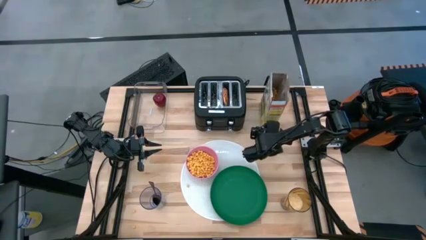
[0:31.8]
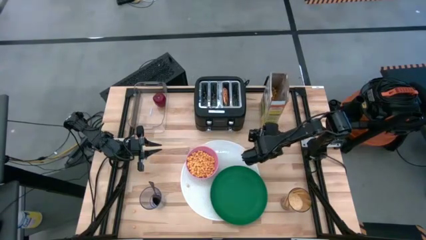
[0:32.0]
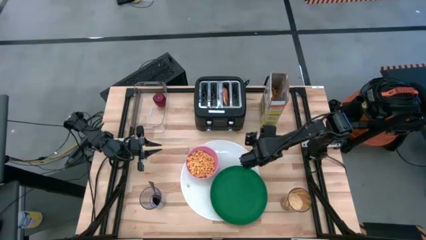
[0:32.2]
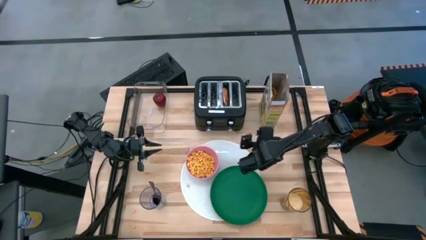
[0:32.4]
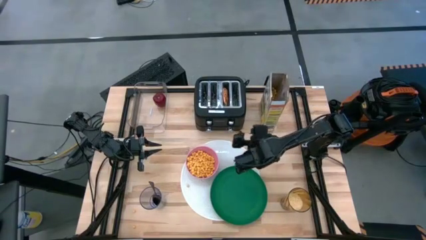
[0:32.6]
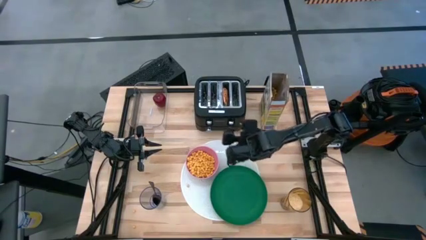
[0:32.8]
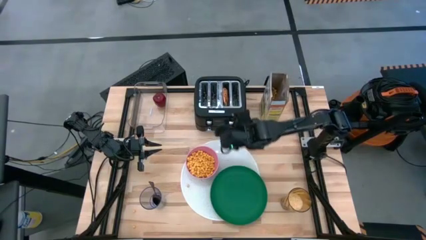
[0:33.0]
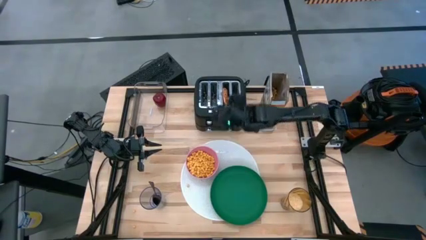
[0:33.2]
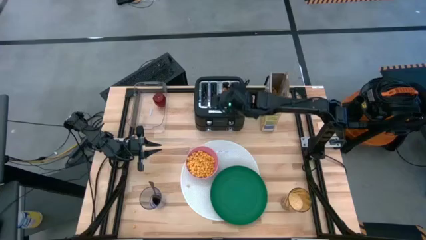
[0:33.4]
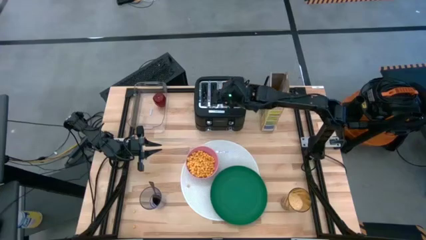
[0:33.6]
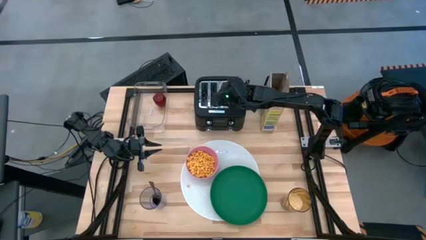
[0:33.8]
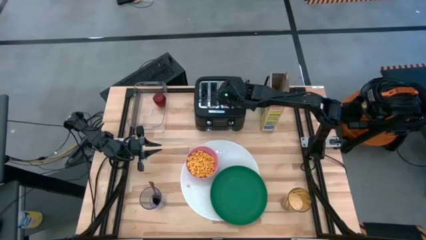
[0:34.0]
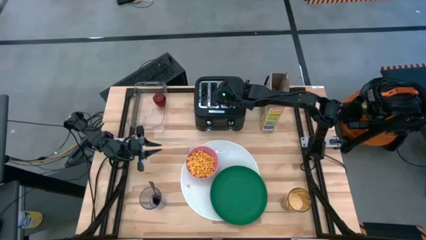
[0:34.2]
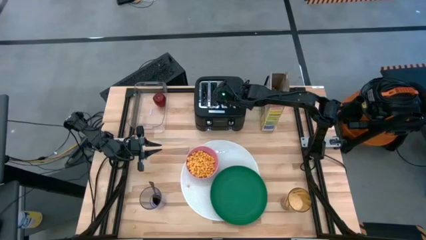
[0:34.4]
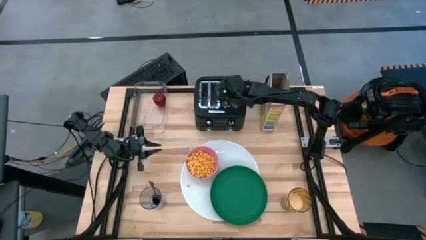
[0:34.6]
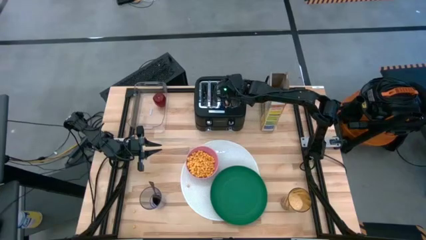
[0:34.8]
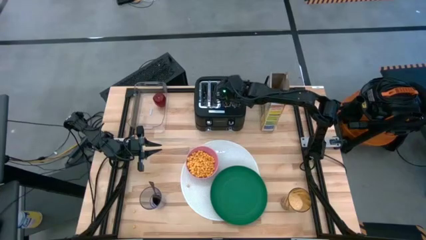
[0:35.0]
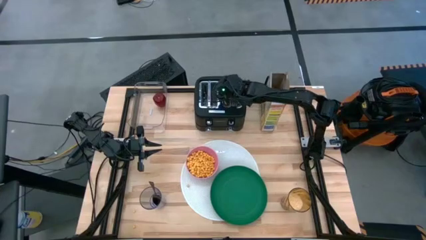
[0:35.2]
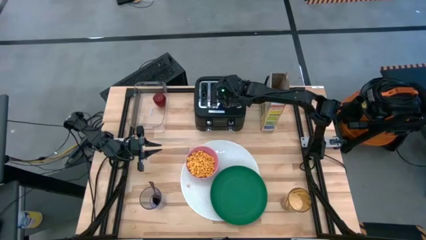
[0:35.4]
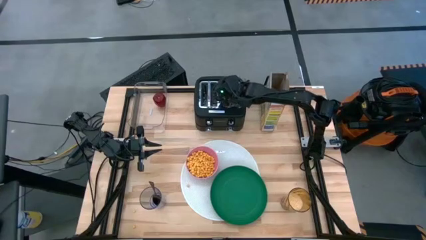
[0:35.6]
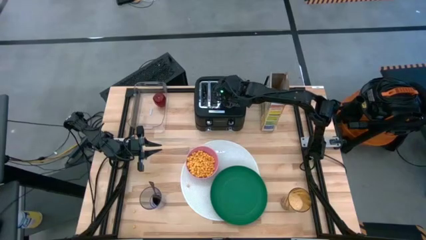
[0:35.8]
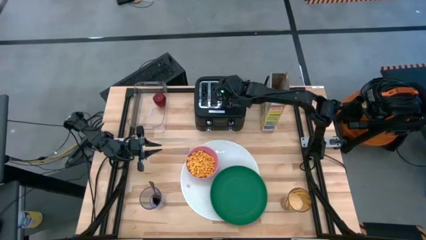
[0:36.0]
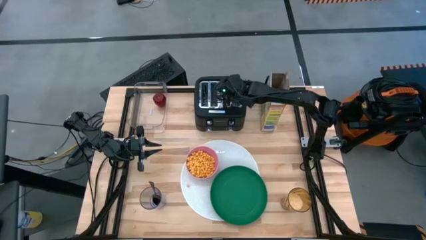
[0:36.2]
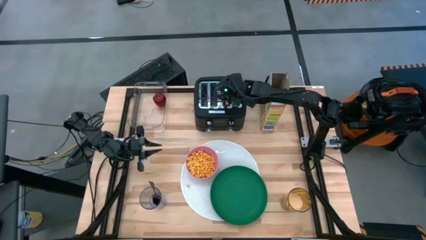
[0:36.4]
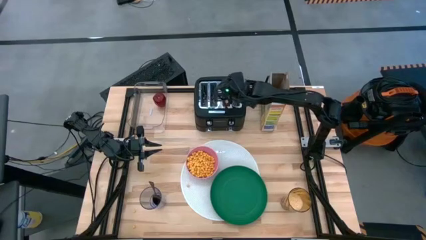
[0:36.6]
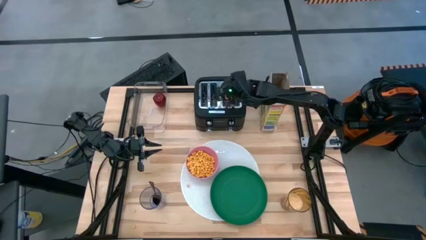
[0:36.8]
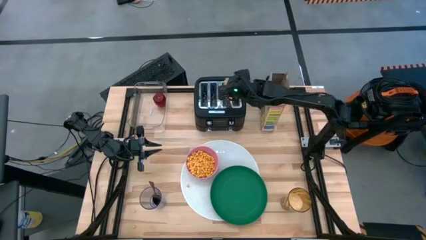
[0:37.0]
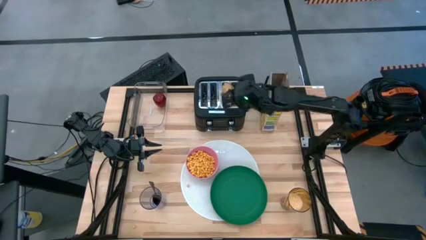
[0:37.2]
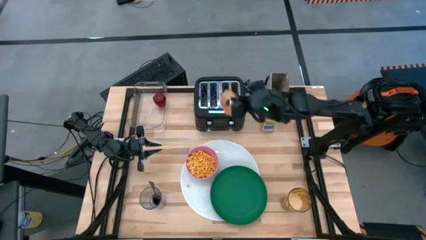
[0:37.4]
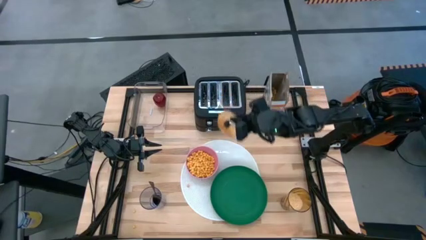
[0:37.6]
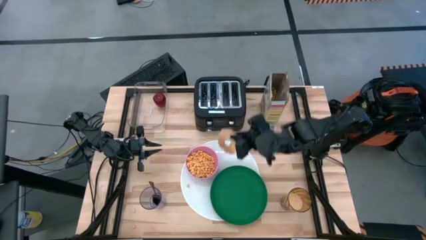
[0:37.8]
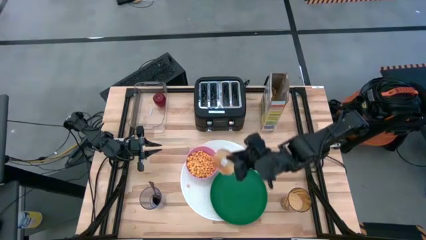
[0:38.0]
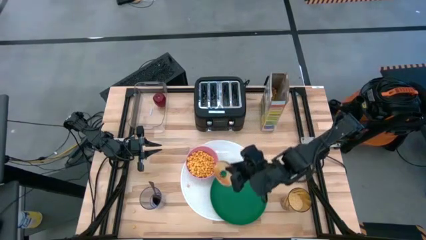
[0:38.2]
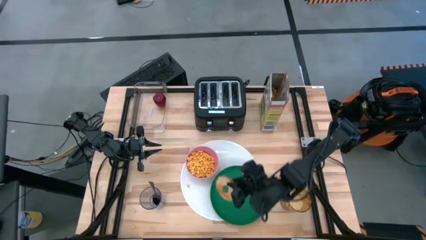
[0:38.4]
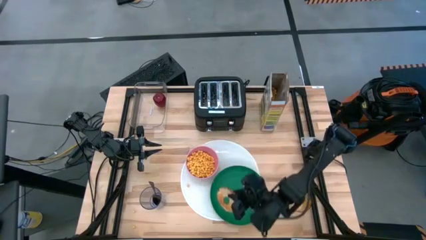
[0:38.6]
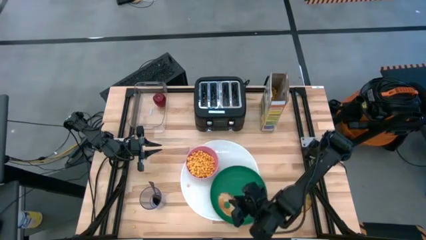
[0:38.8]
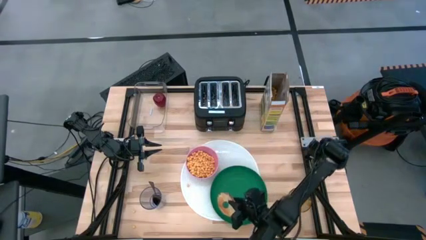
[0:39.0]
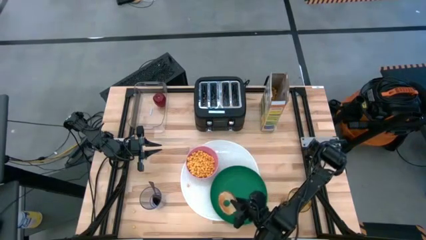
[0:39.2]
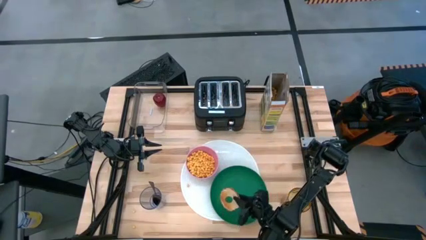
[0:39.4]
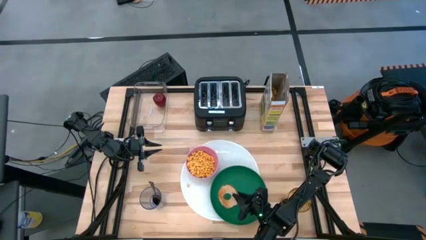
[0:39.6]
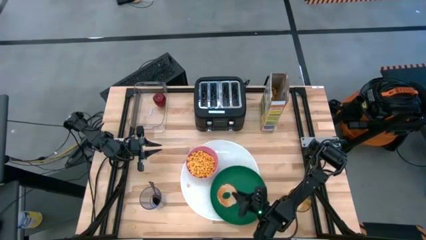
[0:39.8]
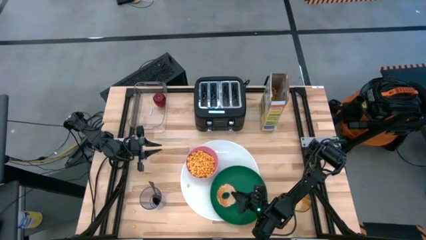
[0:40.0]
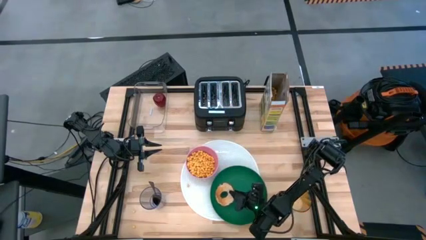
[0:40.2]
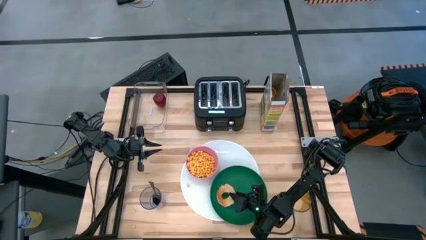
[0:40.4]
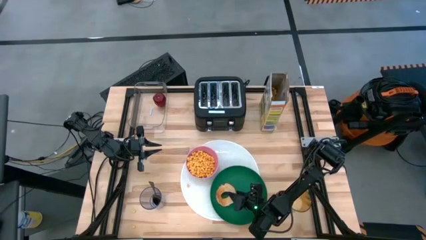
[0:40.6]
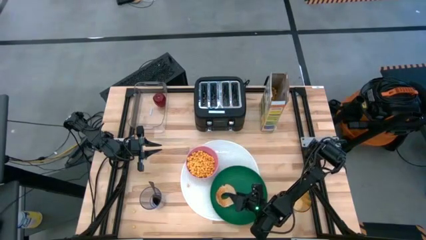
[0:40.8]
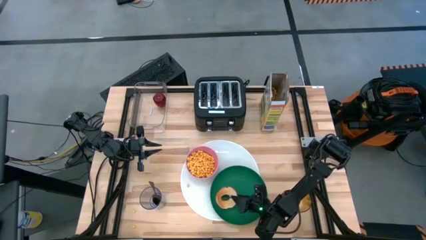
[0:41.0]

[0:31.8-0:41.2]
Task: Arrange a breakfast setting
Put the toasted bread on the green plate

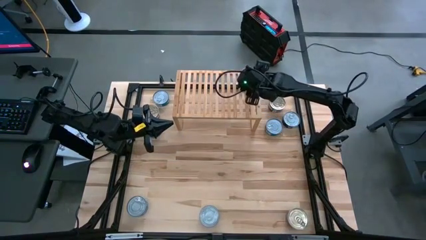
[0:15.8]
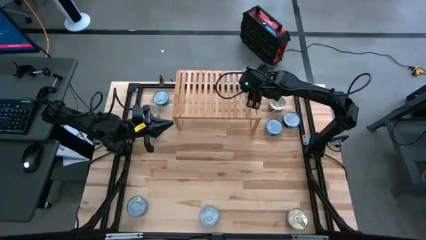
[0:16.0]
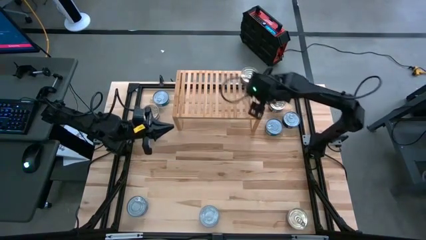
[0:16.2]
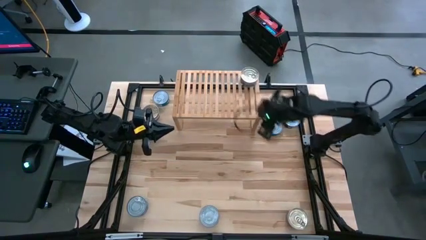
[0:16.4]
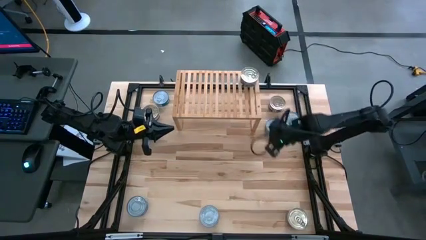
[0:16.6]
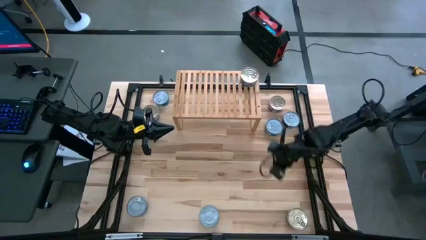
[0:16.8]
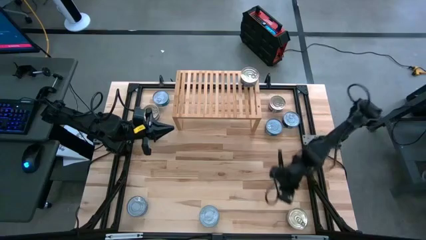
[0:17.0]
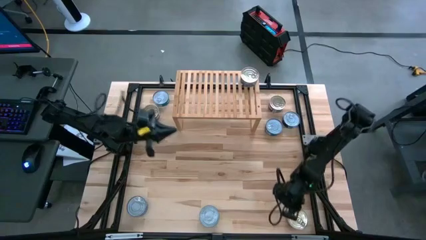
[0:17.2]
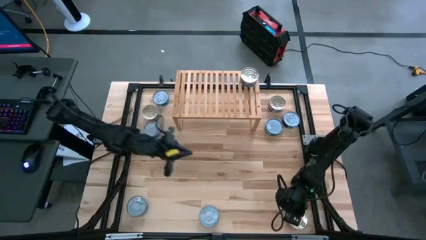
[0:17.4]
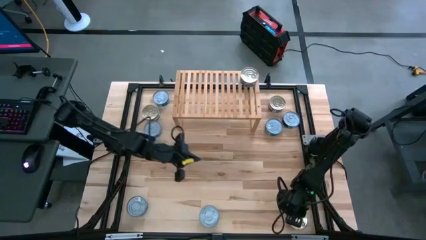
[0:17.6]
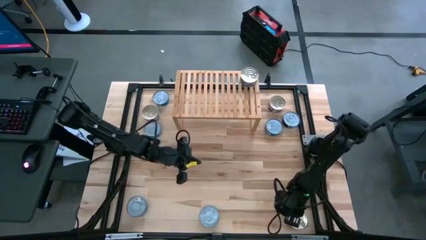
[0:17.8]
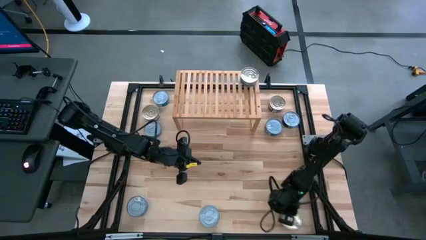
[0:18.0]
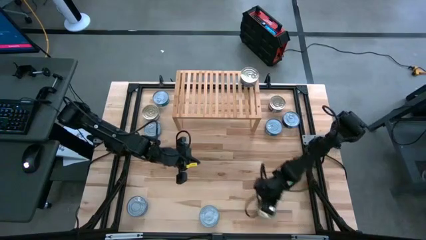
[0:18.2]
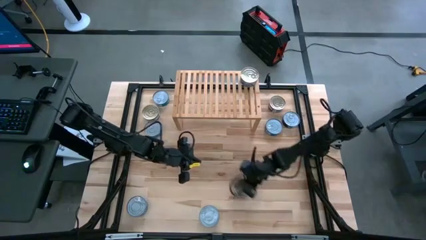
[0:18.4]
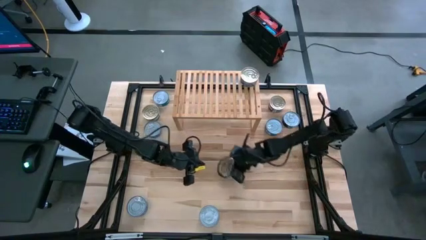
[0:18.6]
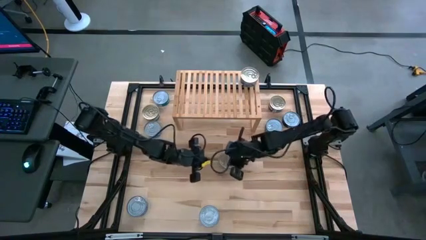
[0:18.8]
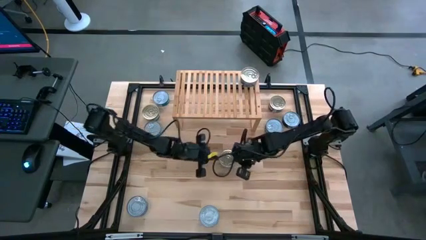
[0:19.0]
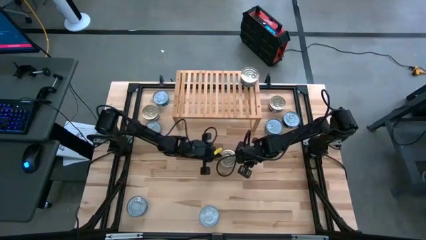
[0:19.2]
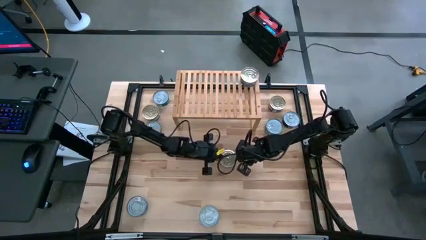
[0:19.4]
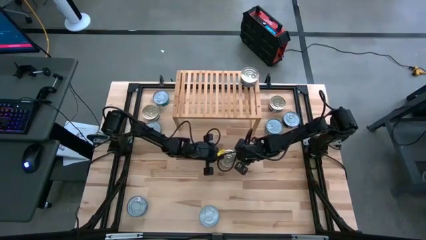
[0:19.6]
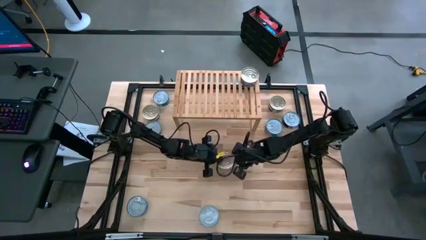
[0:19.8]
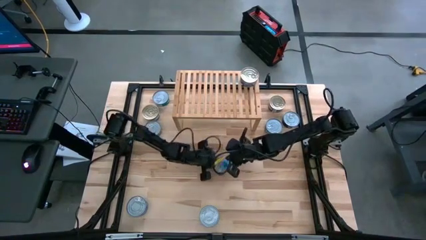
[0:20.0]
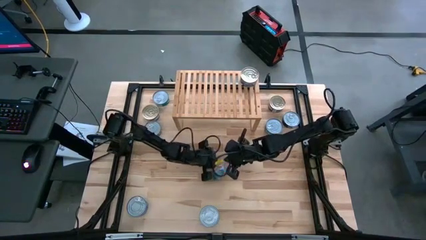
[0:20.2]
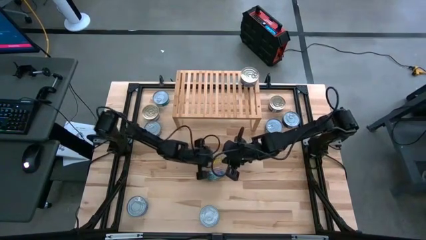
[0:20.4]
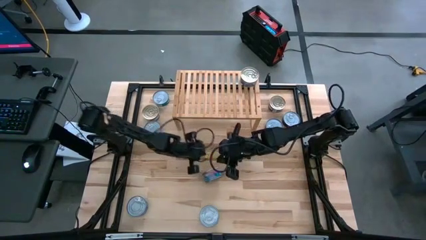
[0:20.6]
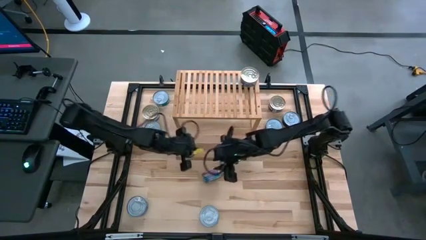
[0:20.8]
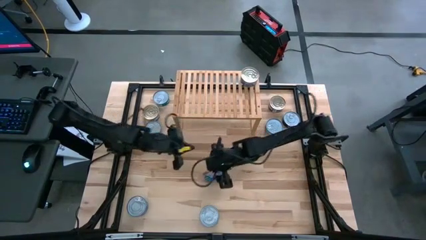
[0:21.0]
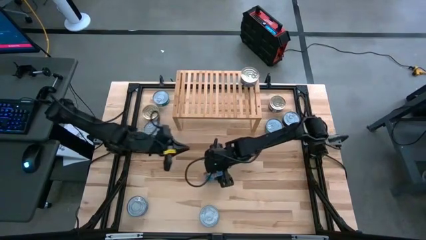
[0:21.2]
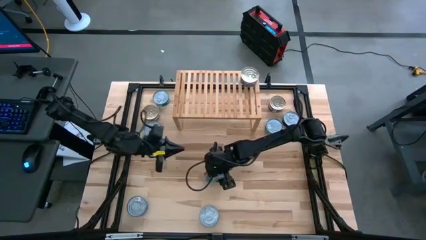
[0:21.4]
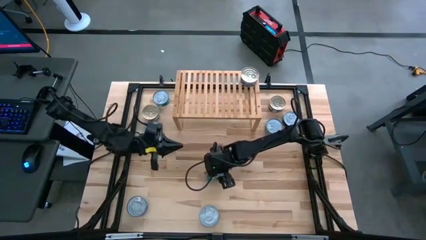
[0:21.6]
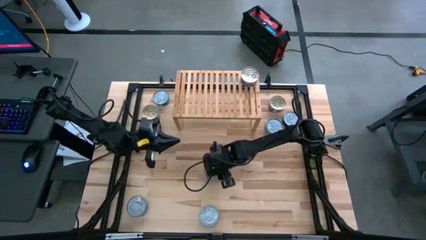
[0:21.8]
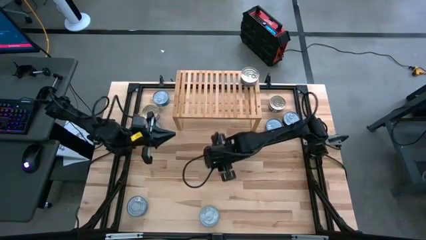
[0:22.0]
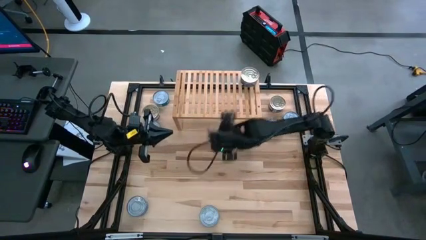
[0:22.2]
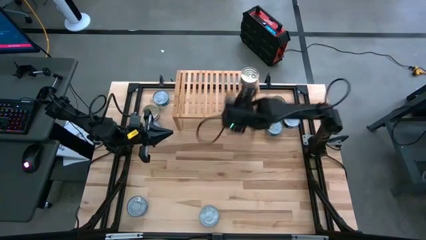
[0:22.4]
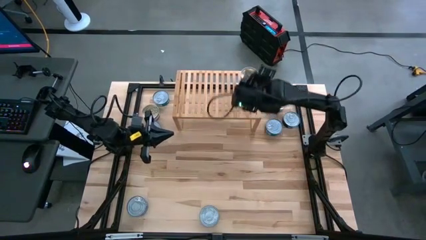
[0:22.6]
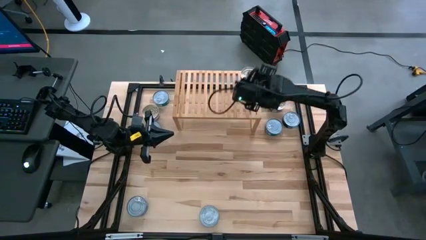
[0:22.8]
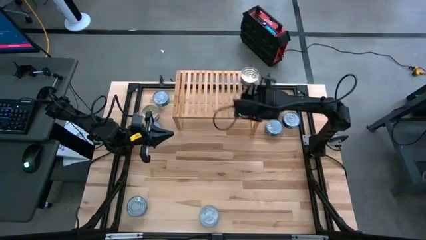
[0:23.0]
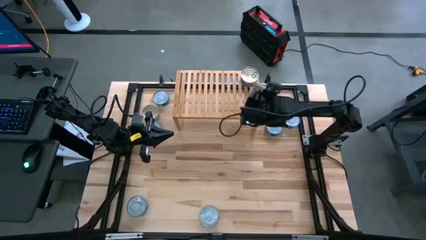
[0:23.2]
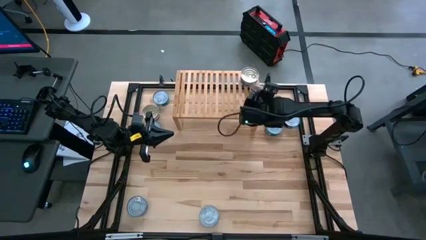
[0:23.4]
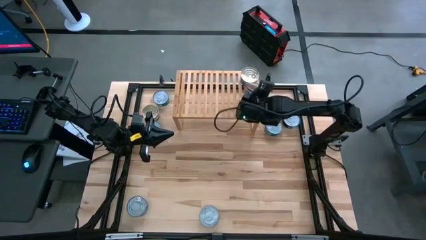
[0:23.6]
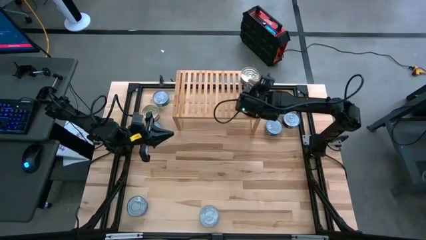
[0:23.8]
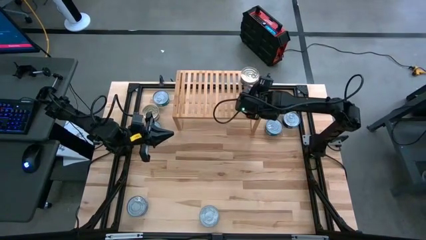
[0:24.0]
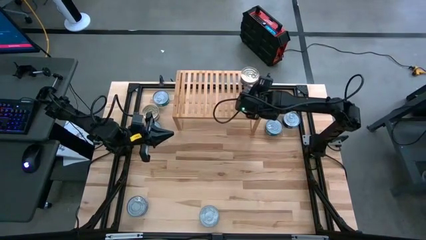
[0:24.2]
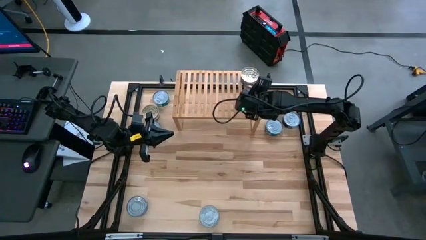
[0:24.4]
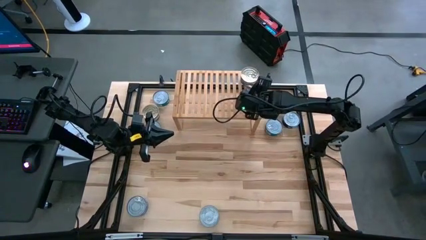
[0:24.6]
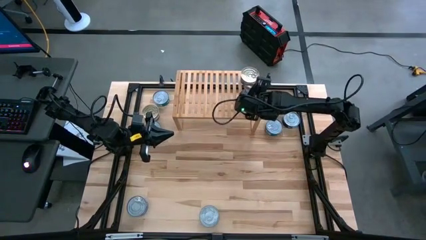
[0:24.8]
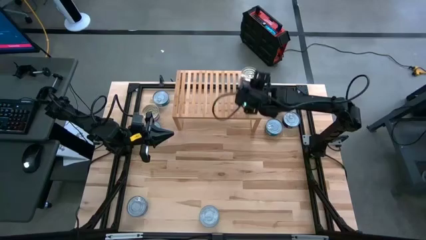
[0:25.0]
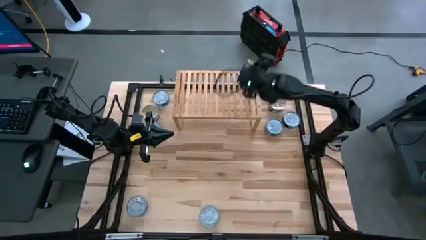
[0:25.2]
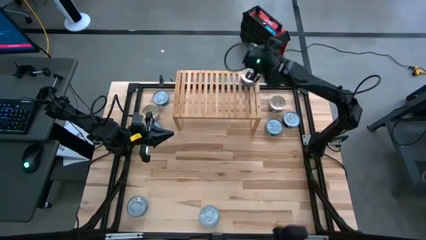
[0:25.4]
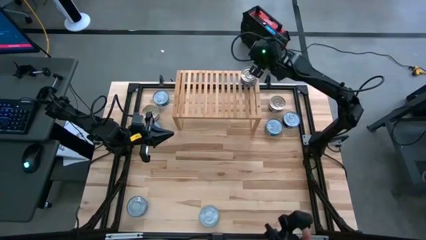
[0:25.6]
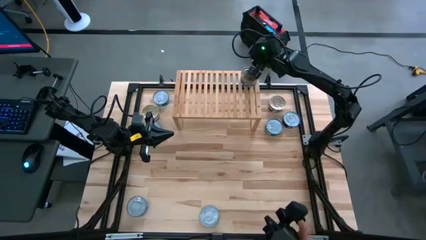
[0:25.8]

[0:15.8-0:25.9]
Task: Stack canned seafood by type on shelf
Stack the blue-pink tuna can on top of the other blue-pink tuna can on the shelf
